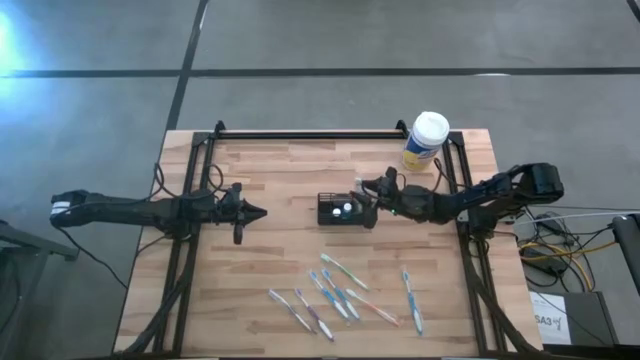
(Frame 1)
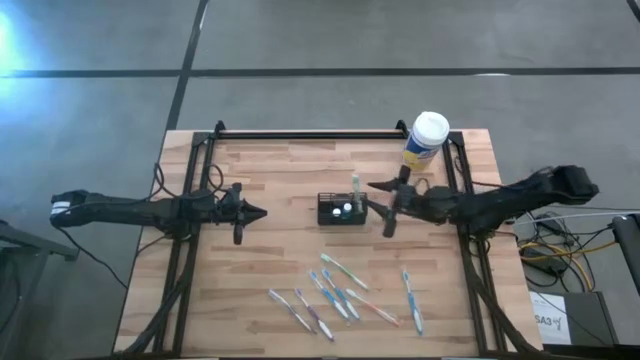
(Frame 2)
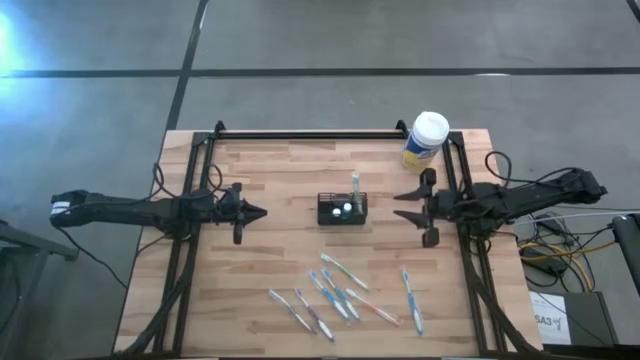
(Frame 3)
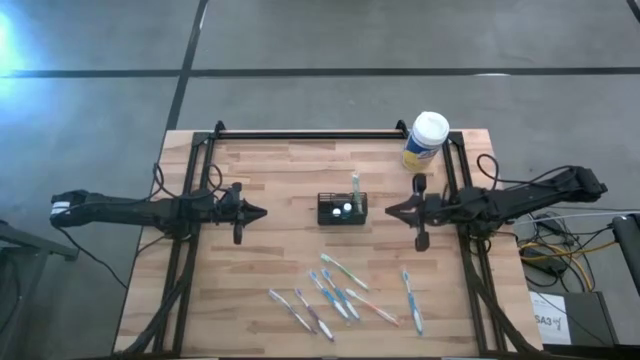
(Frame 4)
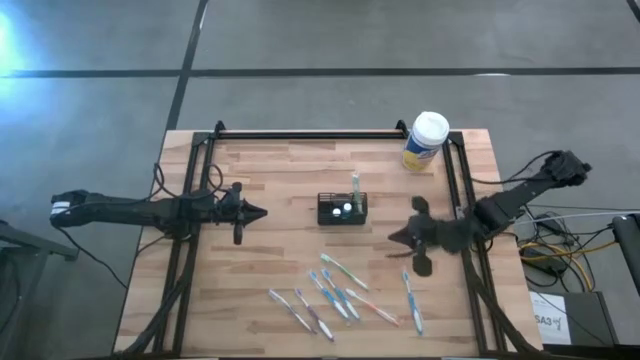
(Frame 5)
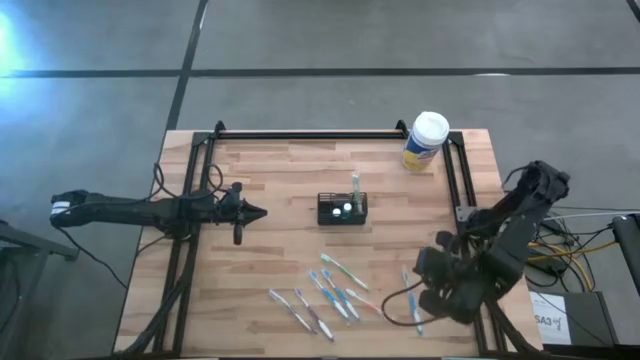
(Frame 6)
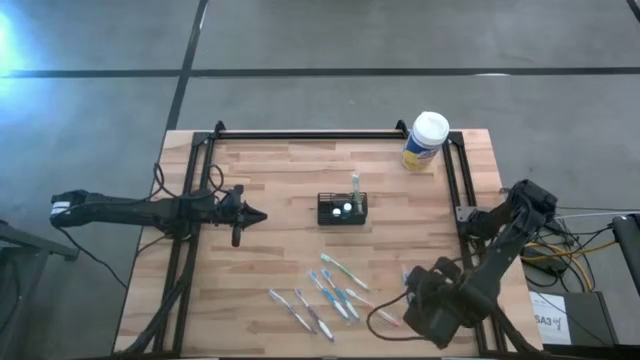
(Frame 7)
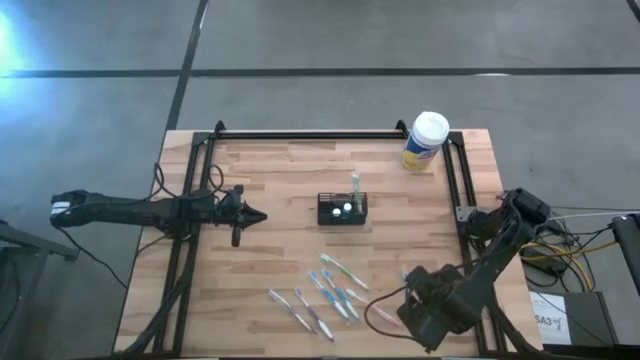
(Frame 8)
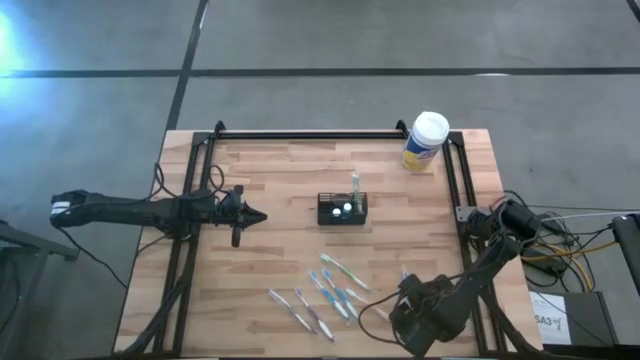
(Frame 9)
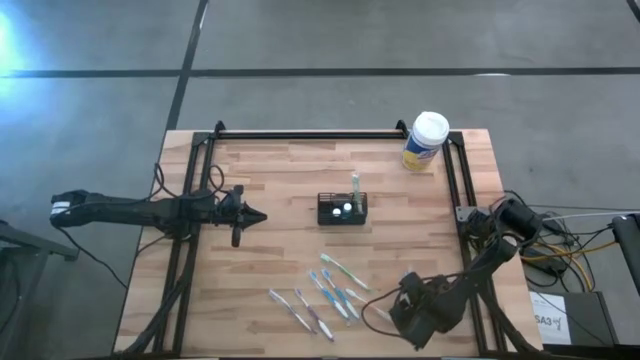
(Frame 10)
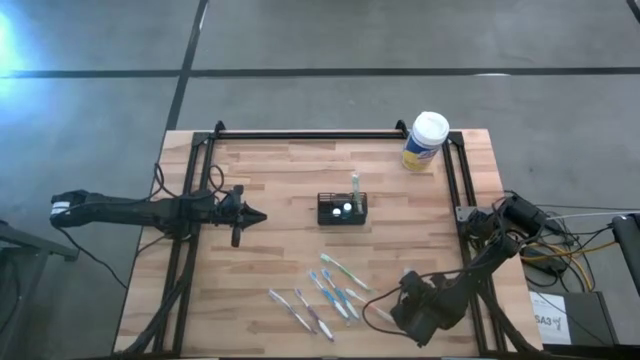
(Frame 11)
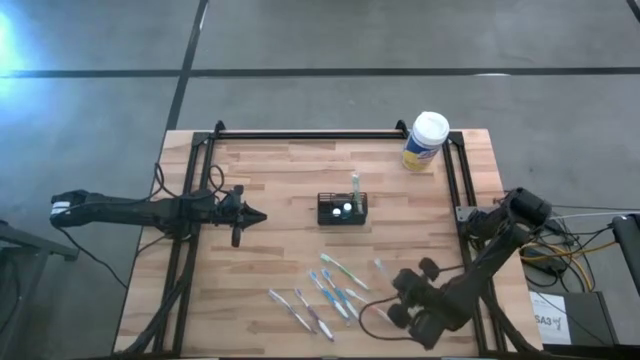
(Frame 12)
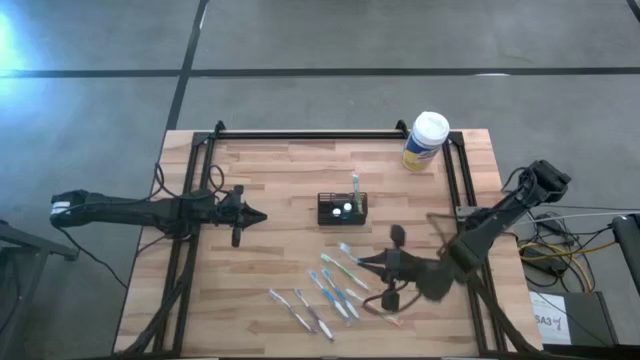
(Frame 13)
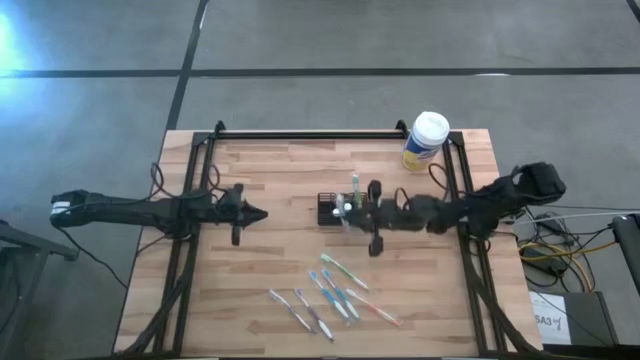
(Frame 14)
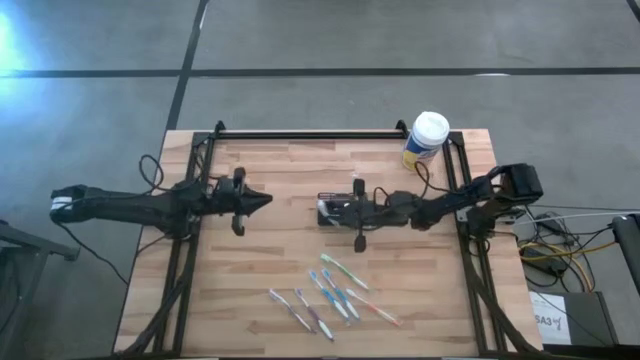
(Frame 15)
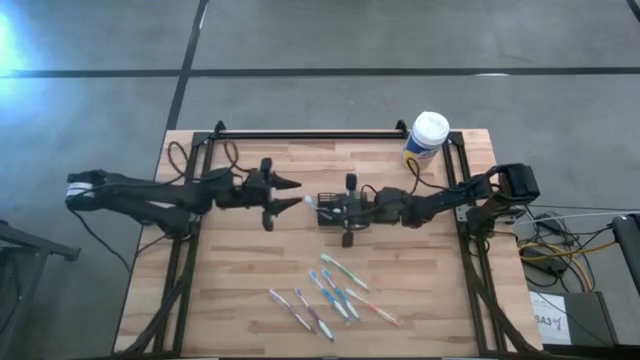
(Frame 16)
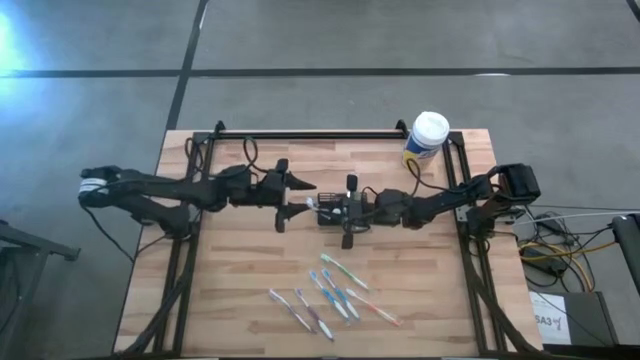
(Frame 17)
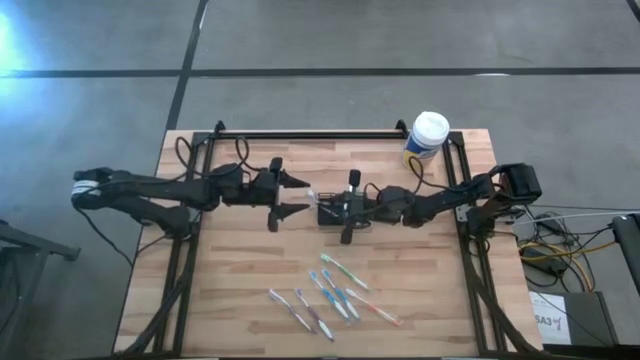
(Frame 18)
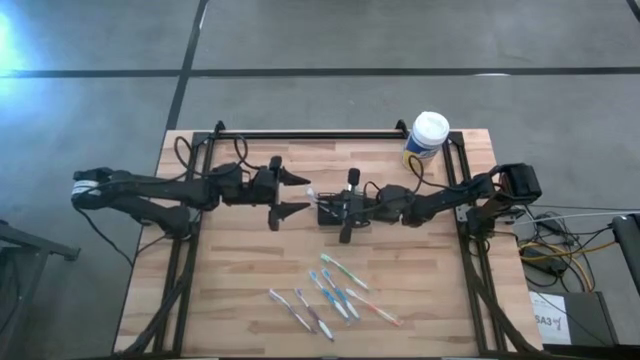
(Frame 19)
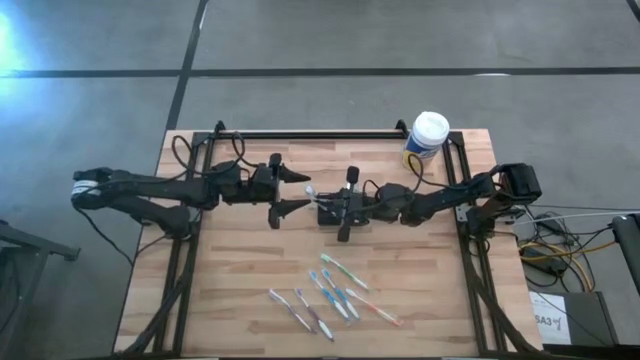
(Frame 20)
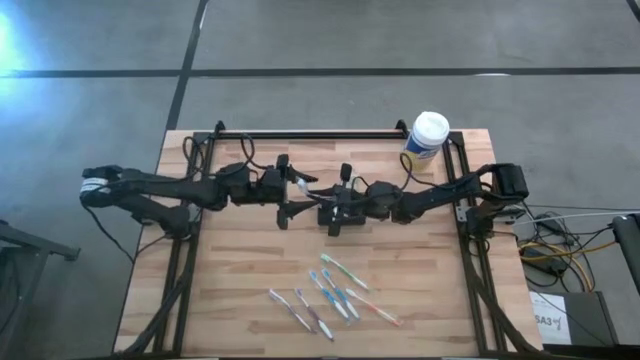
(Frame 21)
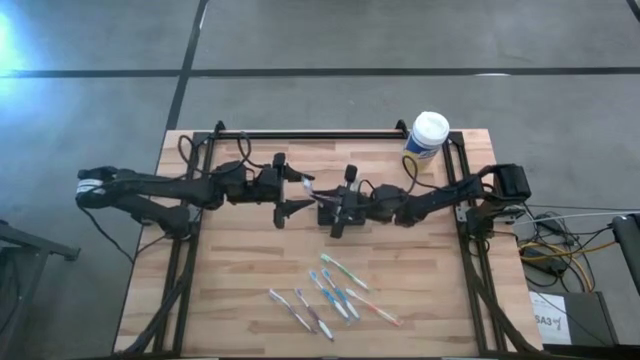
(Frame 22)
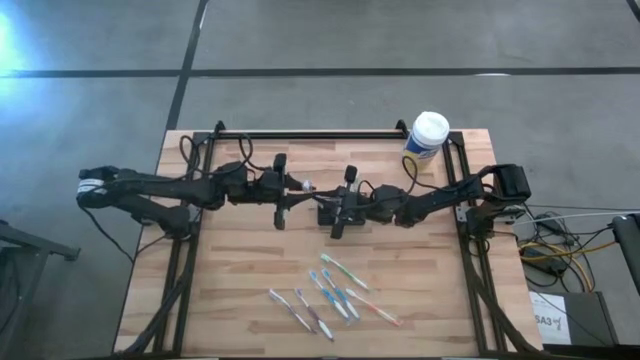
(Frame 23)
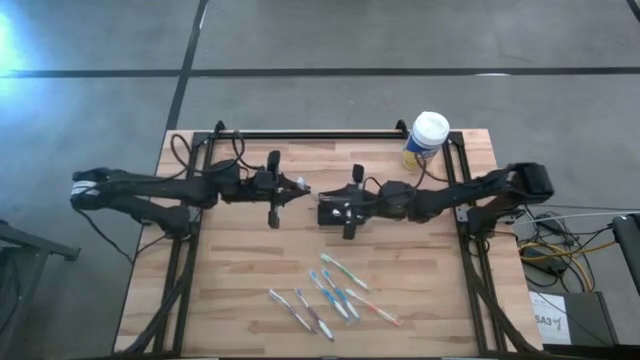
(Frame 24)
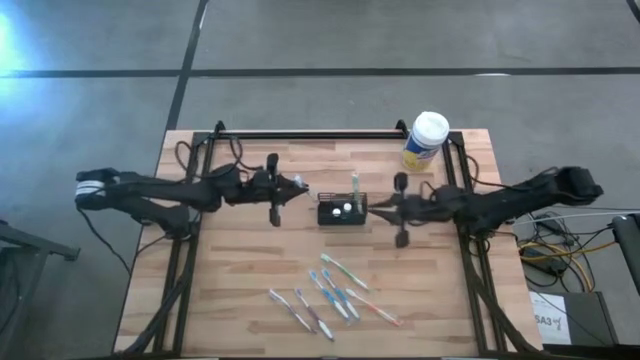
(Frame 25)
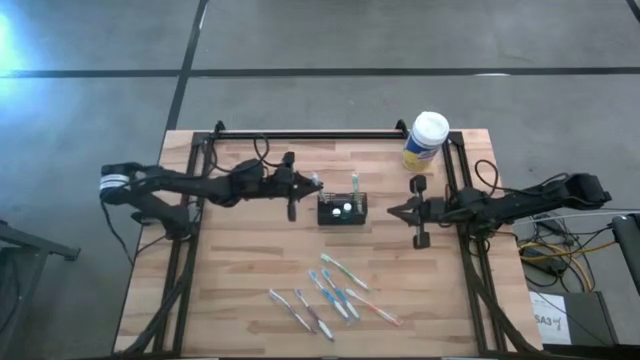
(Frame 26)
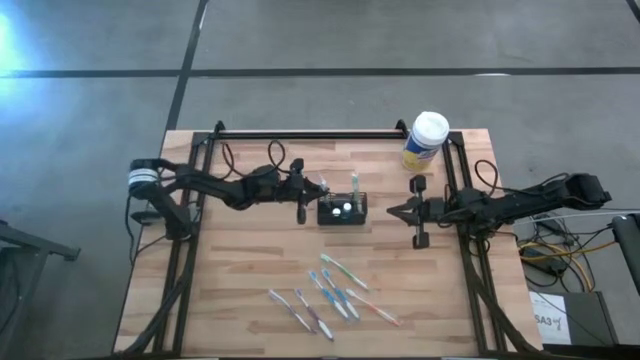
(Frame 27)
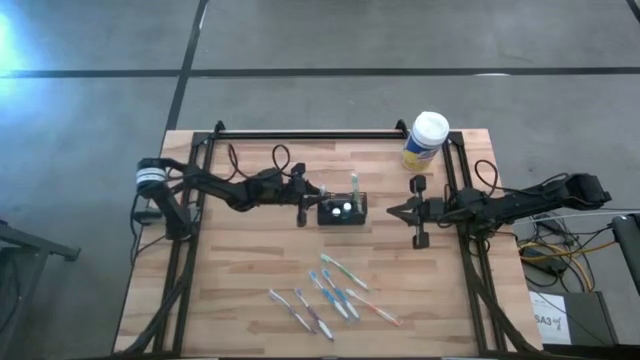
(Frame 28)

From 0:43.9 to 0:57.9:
Task: Pick & Place toothbrushing station
Put the right blue toothbrush into the wire organizer

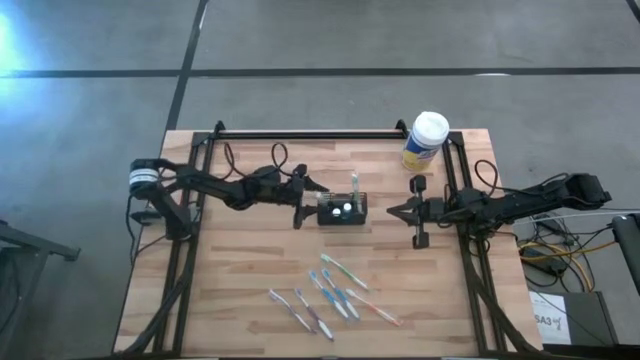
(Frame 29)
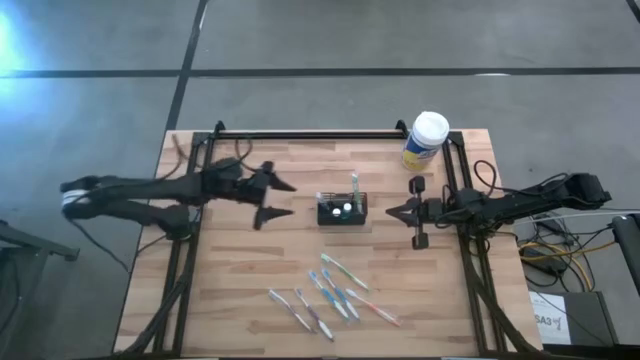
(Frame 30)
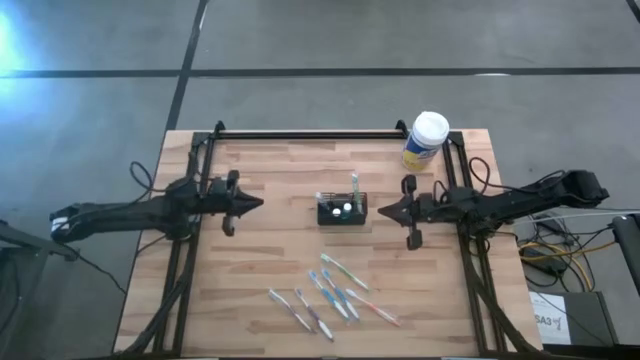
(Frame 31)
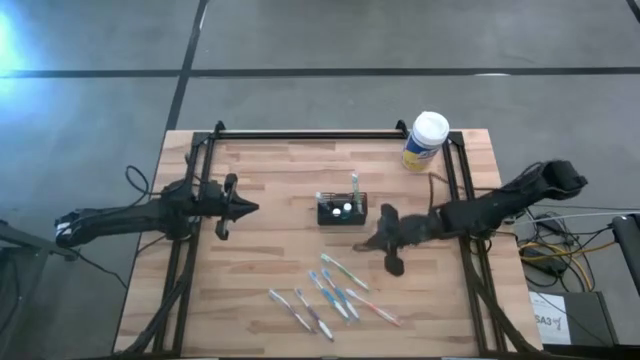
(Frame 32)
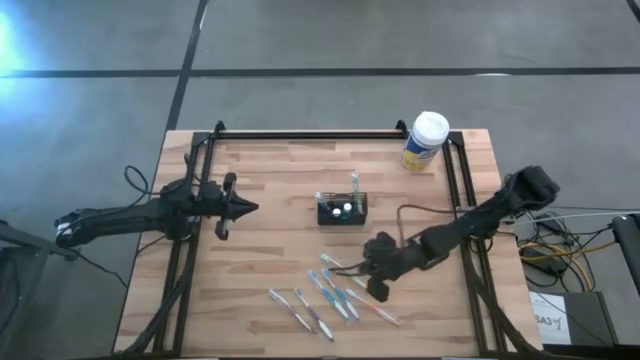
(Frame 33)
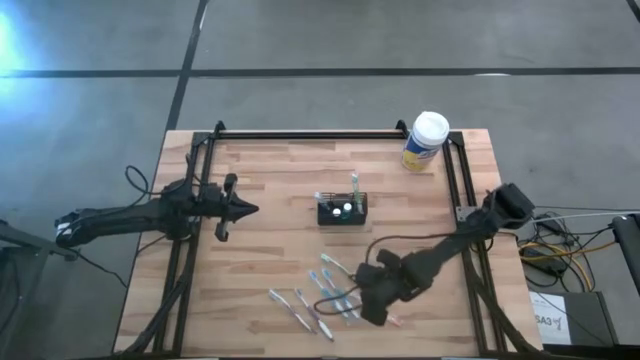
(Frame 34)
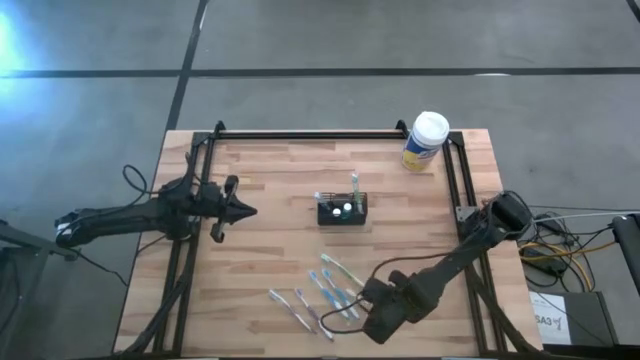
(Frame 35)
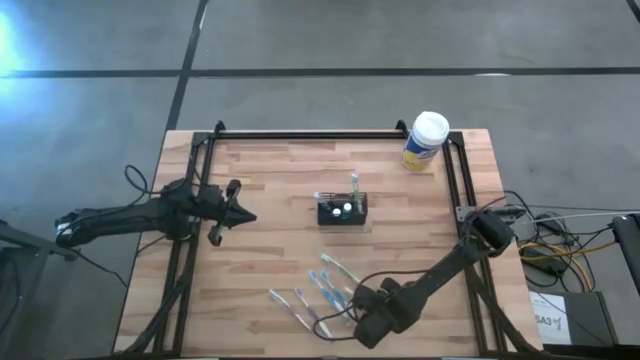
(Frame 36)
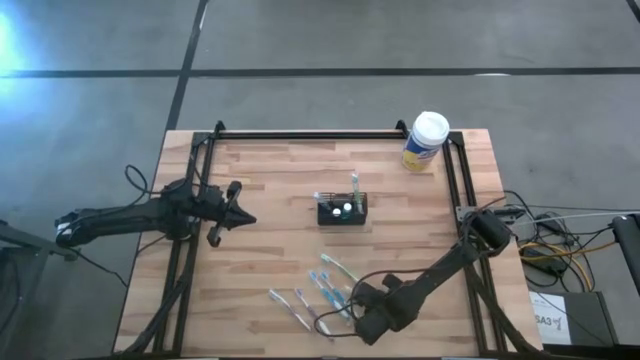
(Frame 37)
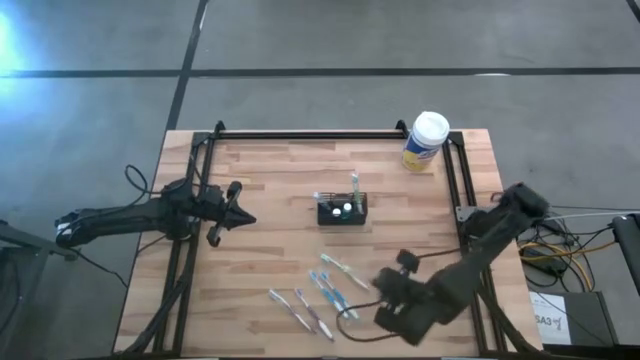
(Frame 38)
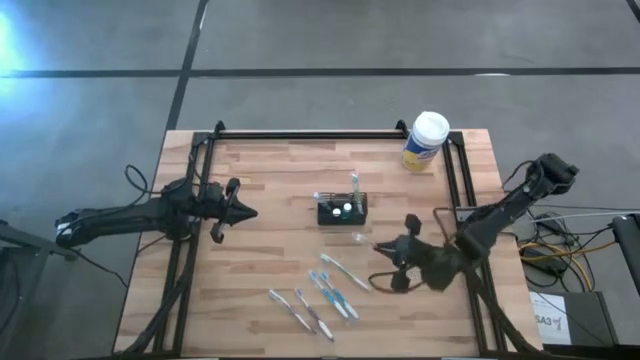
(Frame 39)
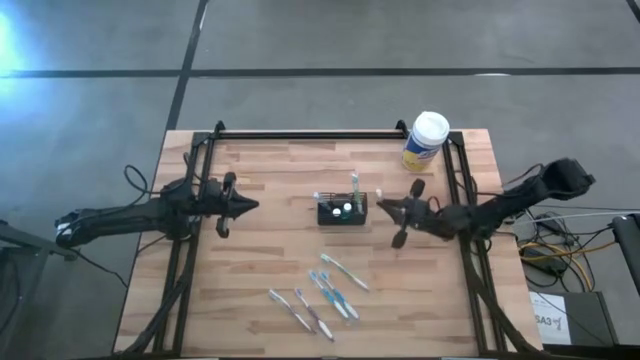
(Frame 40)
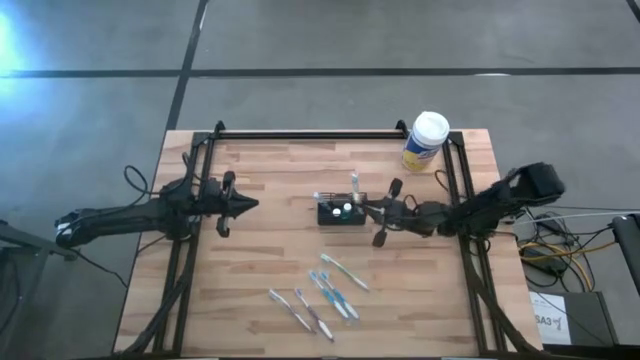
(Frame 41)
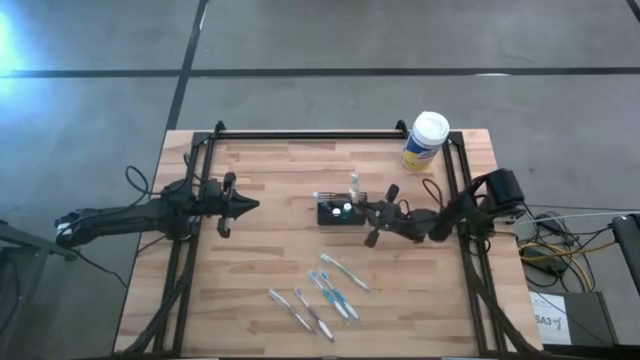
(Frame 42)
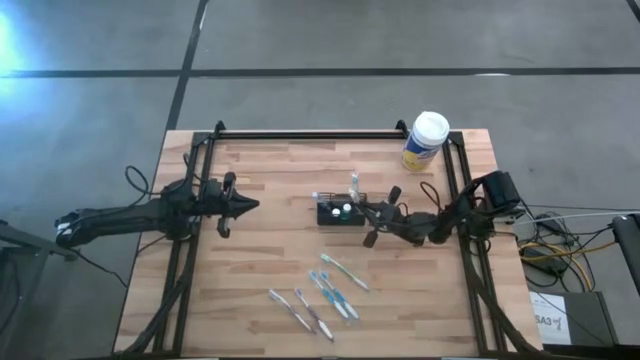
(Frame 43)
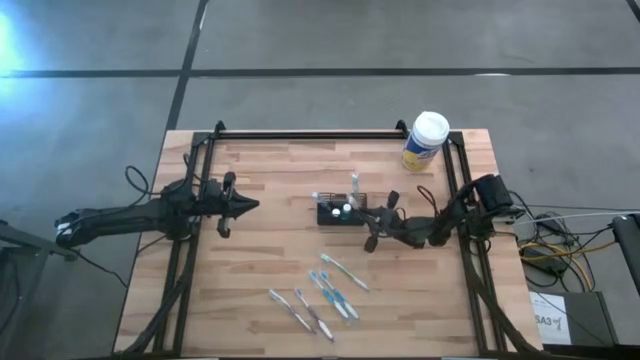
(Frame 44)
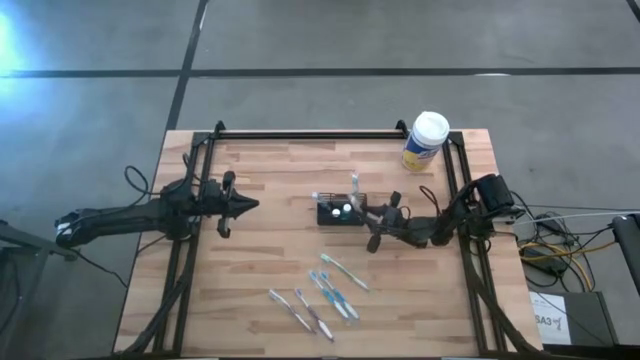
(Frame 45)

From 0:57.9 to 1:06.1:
Put the orange toothbrush into the wire organizer
